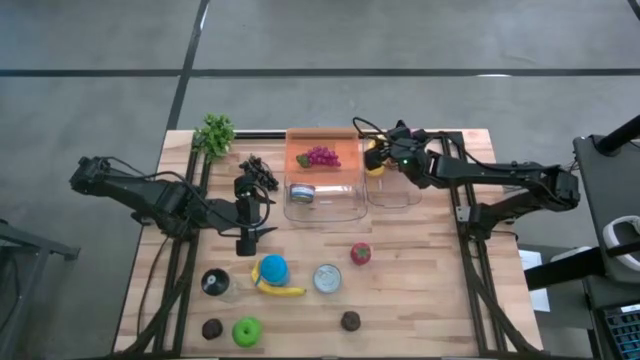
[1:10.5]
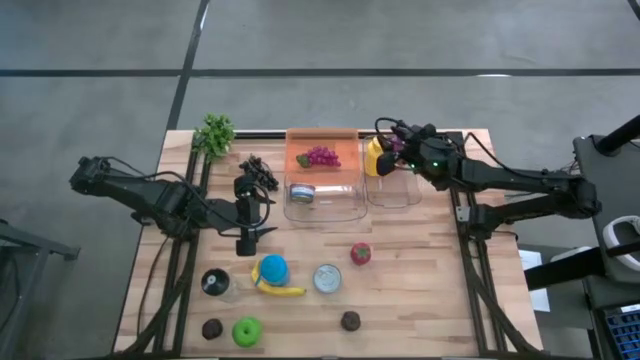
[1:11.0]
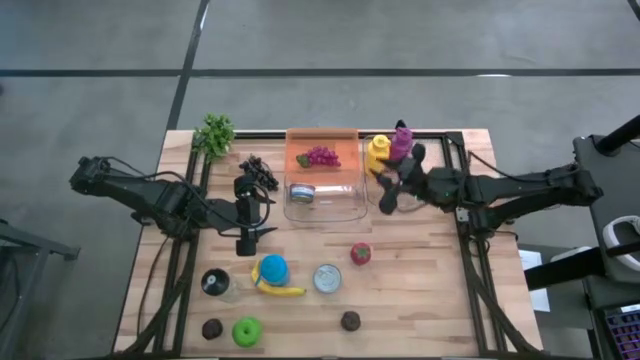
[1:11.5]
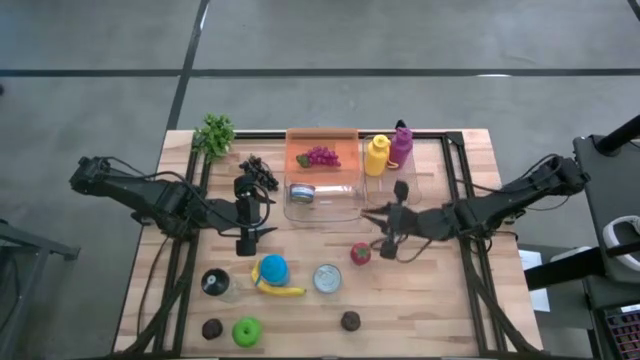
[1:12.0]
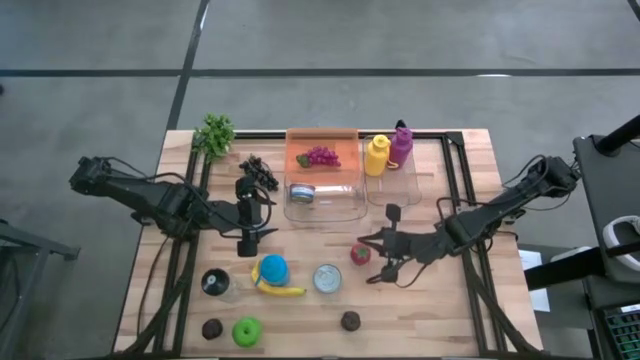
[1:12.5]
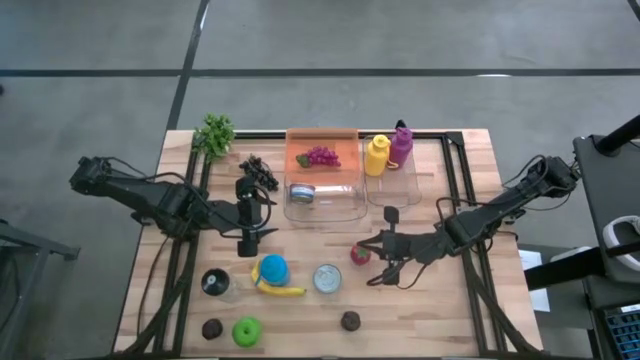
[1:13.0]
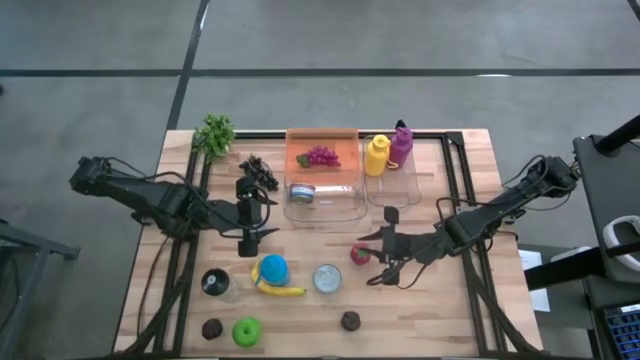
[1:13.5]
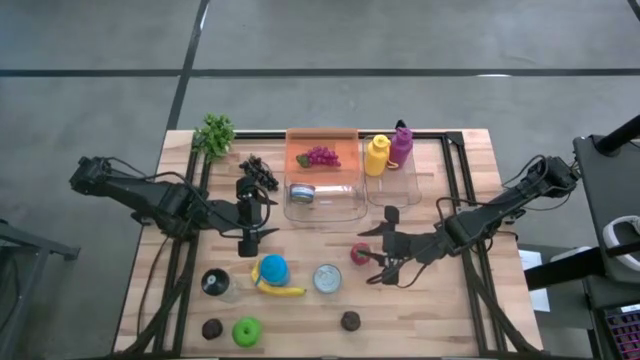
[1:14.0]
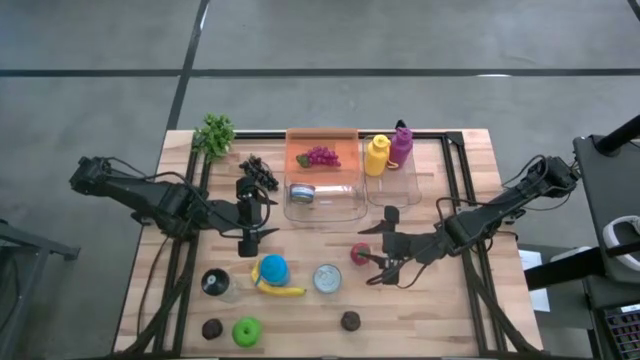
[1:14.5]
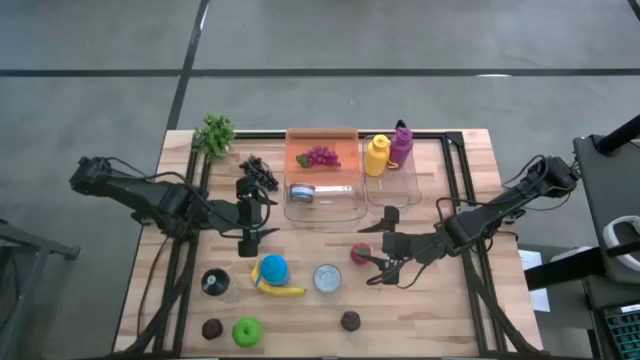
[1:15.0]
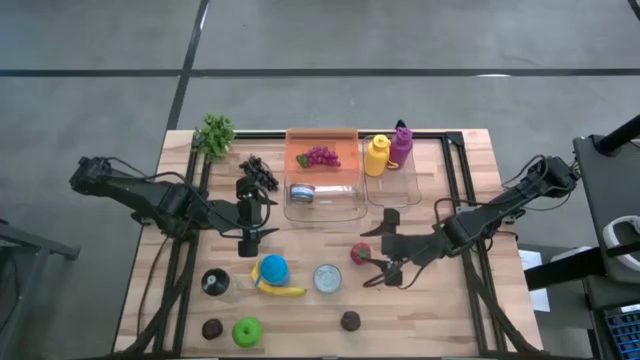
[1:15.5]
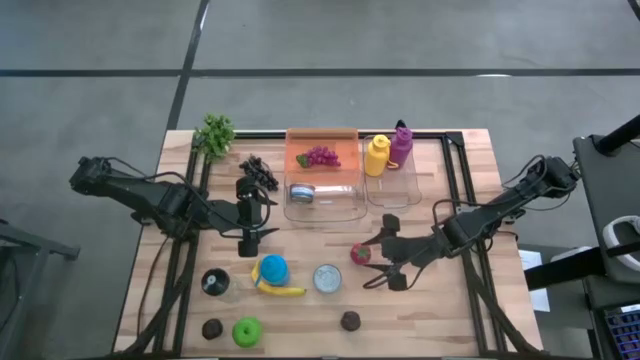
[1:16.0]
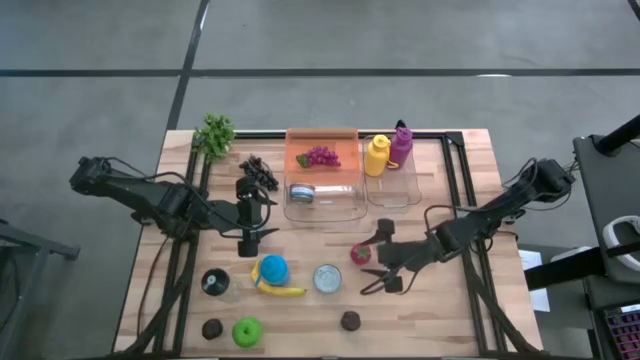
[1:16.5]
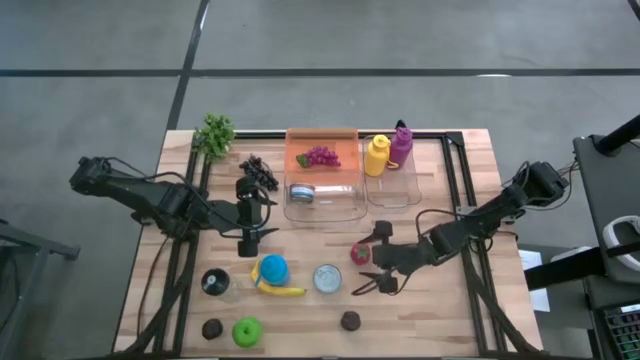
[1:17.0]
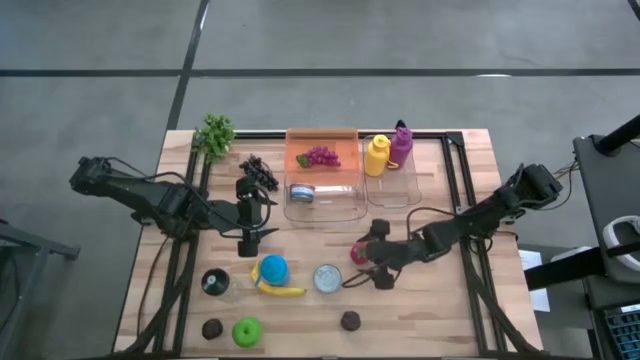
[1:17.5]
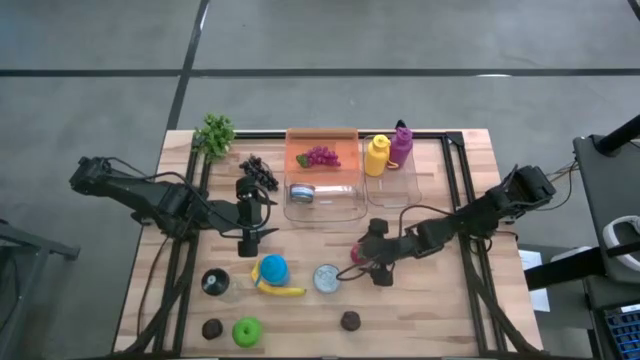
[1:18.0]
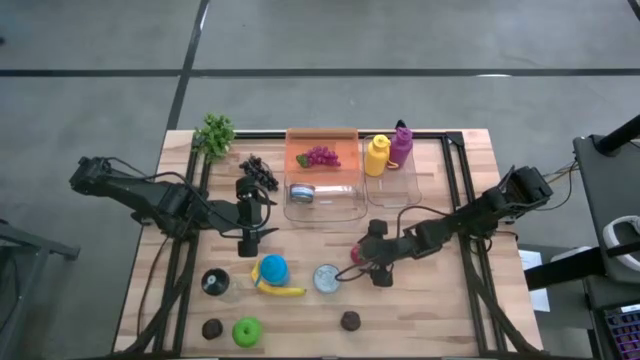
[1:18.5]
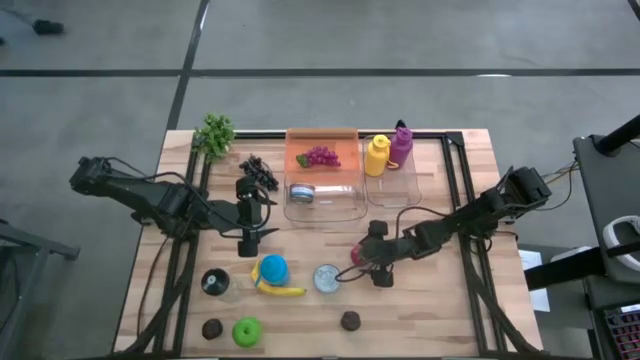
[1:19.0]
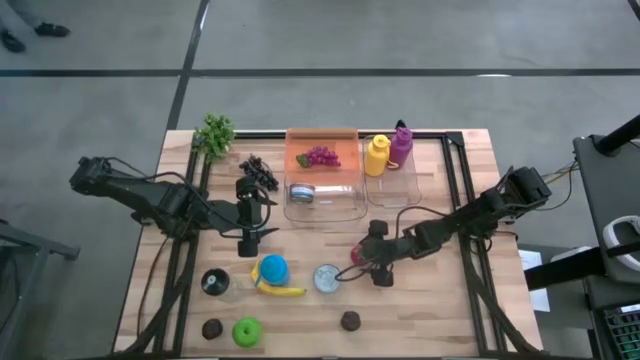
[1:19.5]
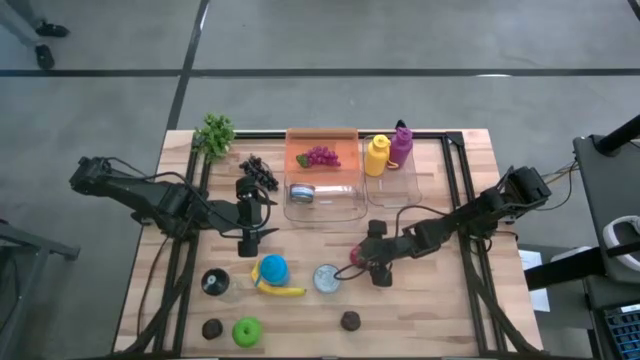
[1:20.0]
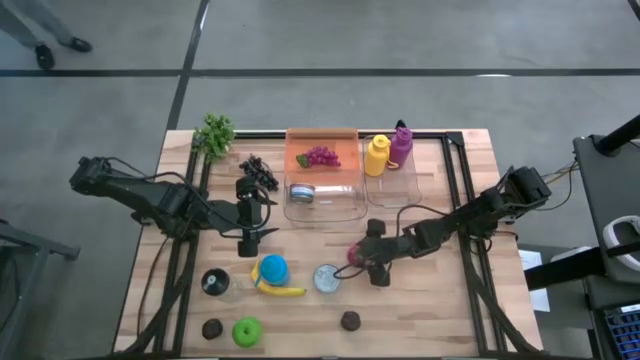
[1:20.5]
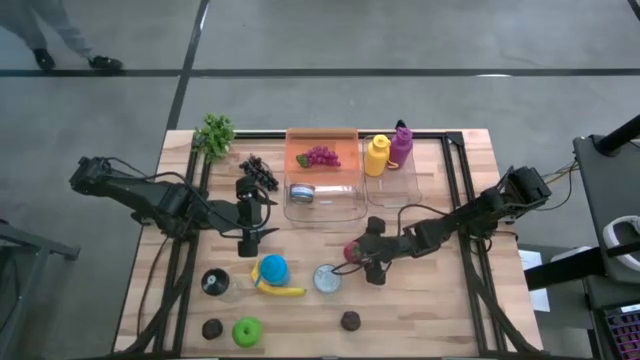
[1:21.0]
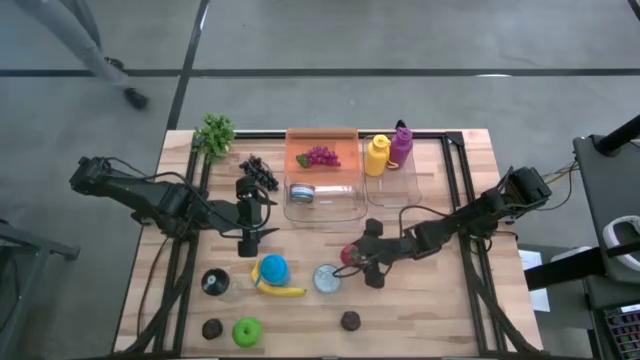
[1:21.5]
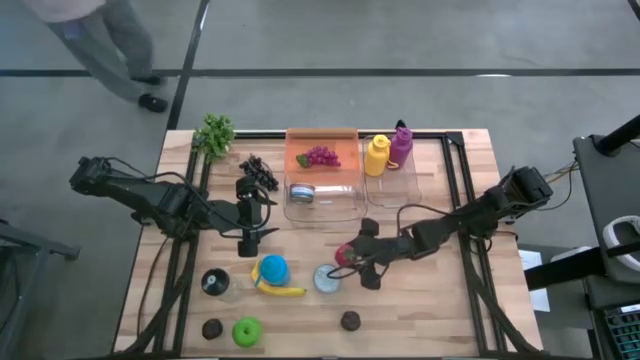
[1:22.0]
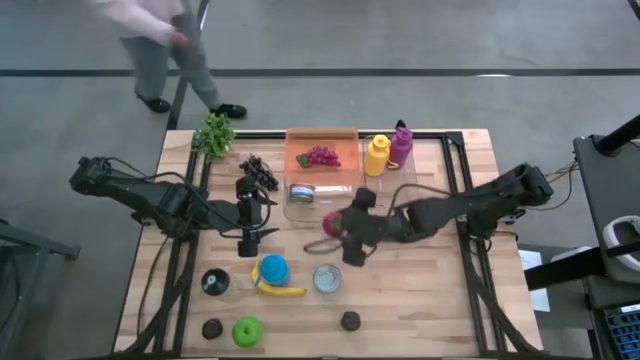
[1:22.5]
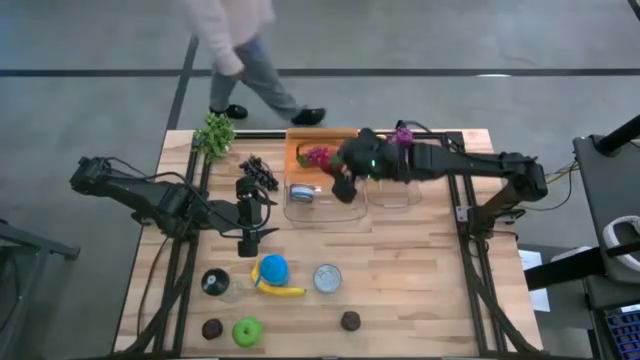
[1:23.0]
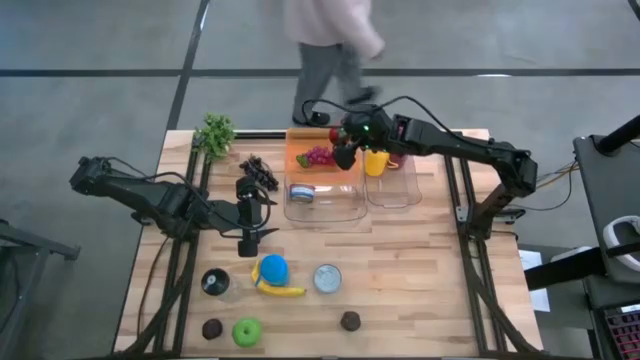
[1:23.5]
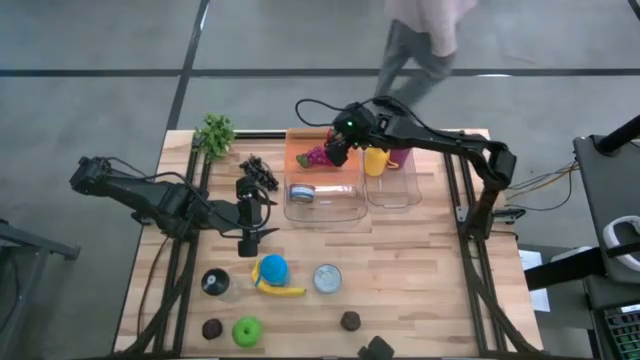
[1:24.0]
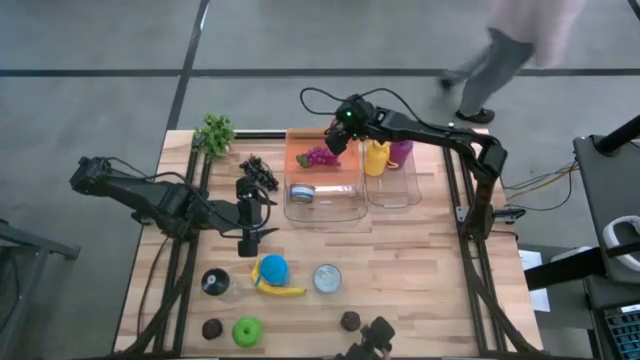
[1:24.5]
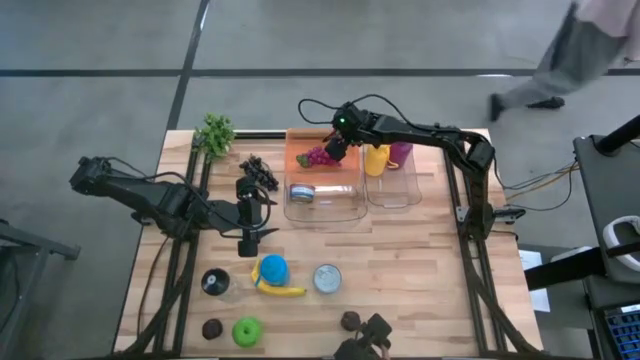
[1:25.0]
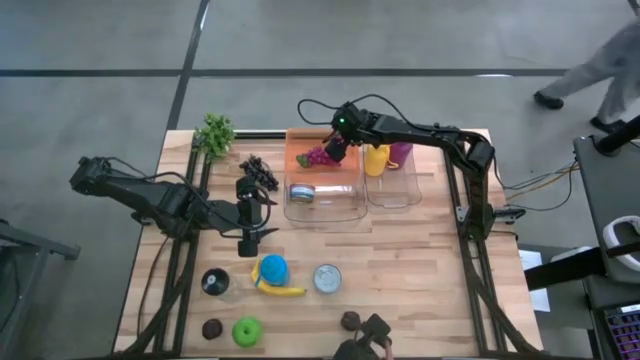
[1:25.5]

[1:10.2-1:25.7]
Task: Pick & Place Food Item
Put the tomato into the orange bin

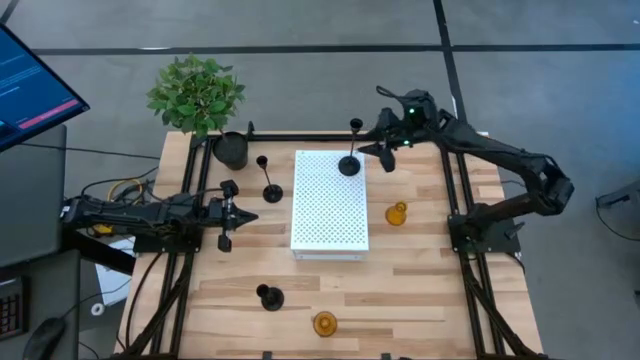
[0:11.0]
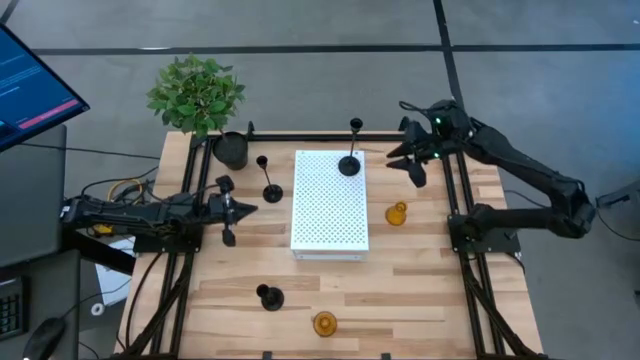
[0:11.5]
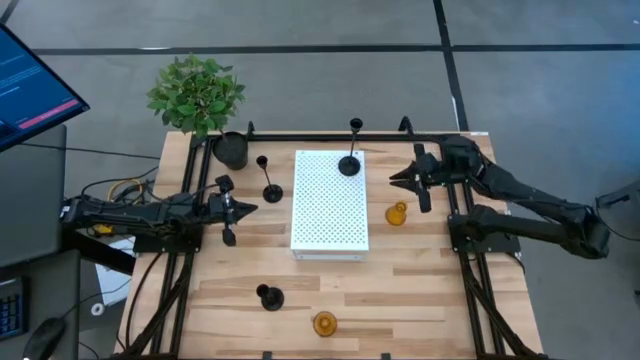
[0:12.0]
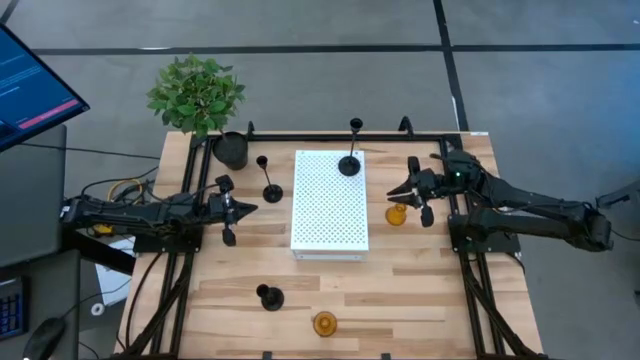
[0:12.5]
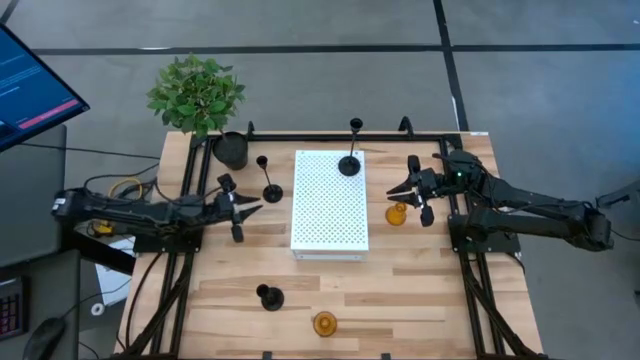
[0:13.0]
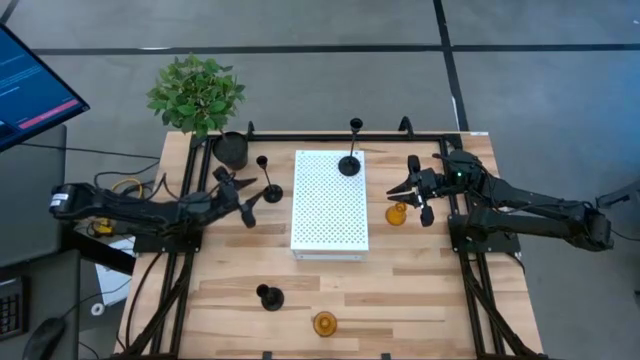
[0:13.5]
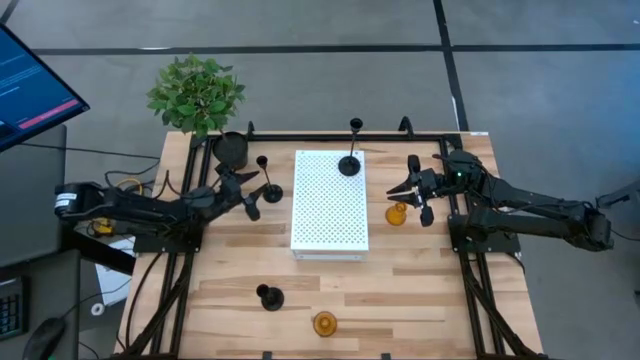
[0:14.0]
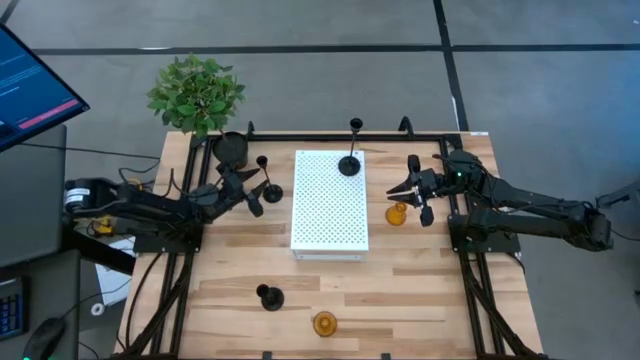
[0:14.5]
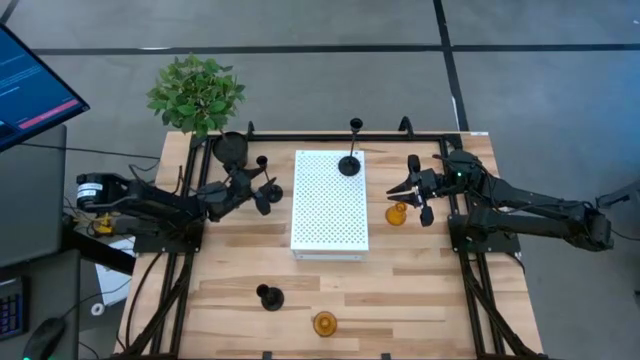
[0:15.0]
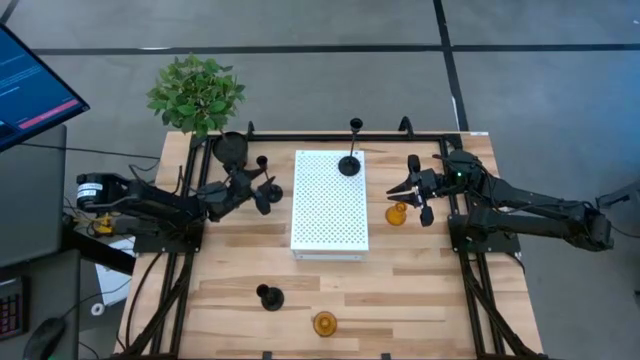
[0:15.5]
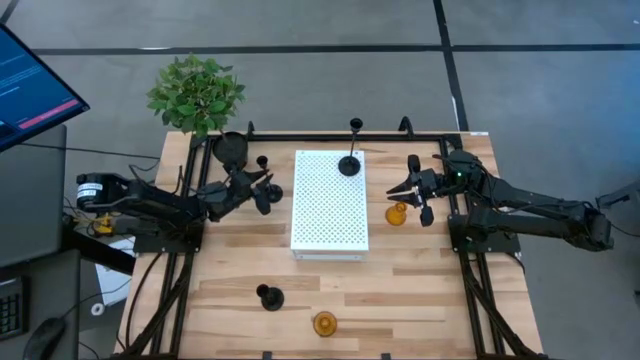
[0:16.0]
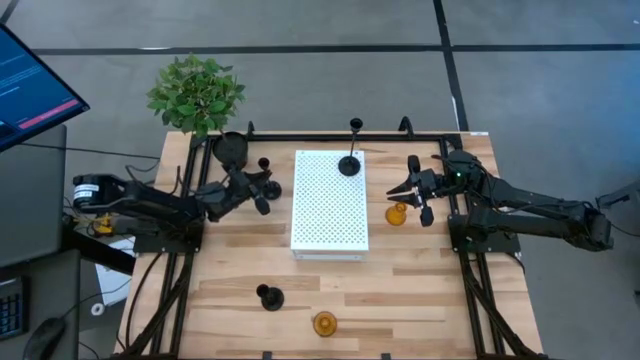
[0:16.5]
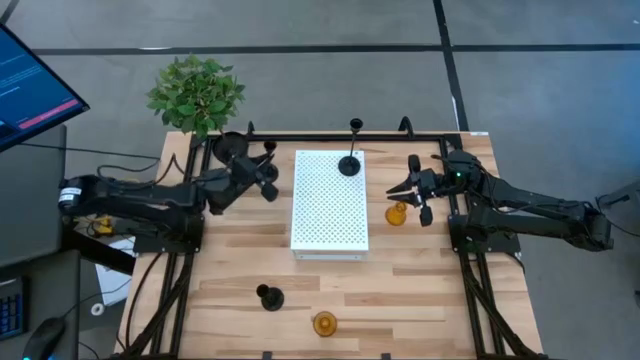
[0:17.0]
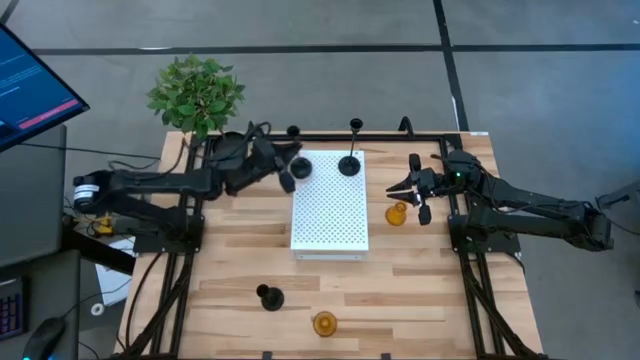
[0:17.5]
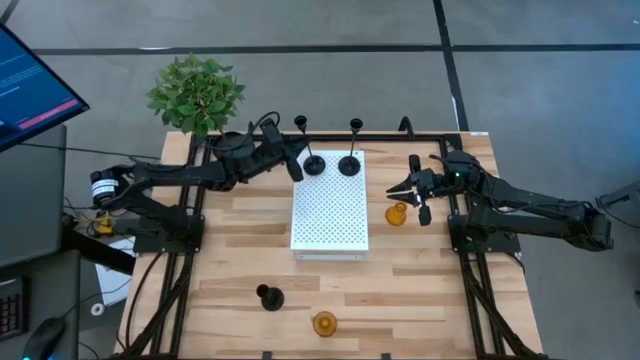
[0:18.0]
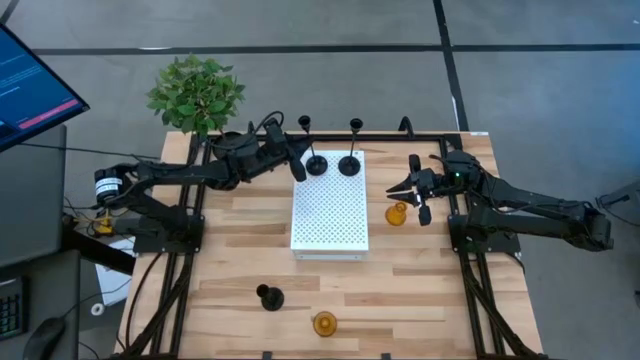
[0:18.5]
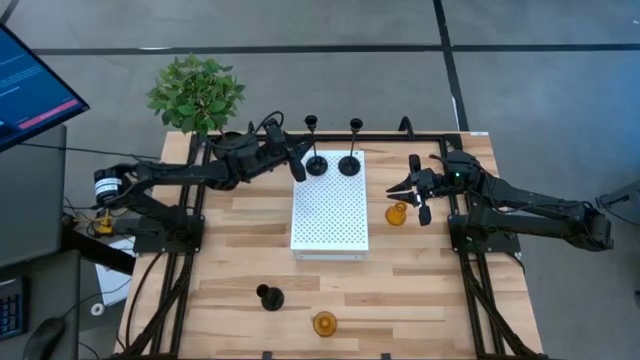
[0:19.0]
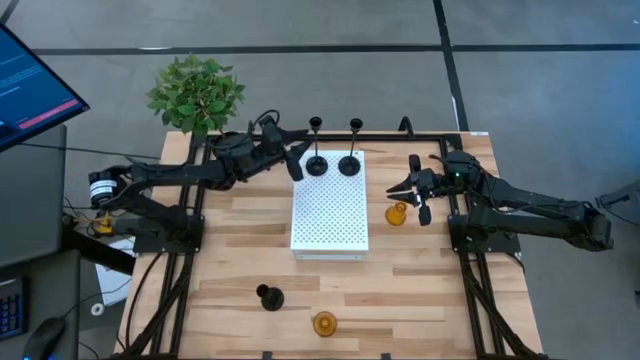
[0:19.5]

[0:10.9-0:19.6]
Task: Pick & Place candle stick holders
Put the top black candle holder on the shelf
